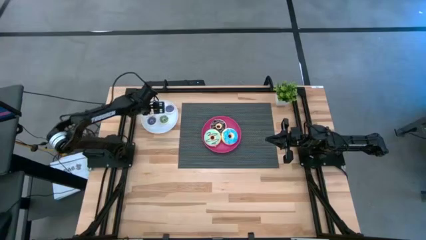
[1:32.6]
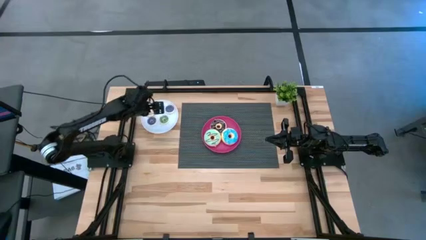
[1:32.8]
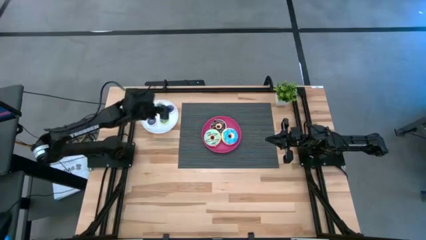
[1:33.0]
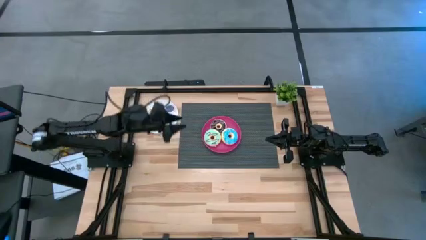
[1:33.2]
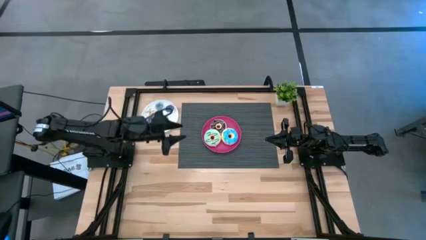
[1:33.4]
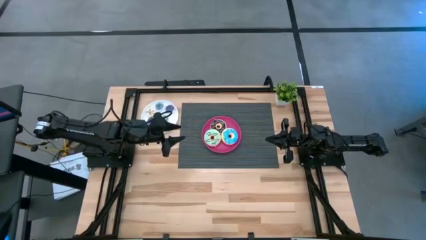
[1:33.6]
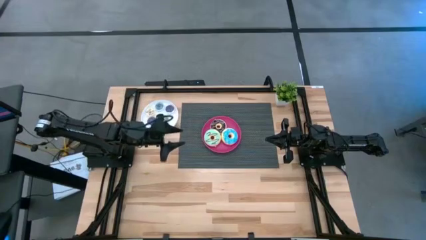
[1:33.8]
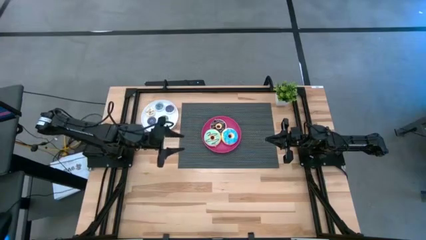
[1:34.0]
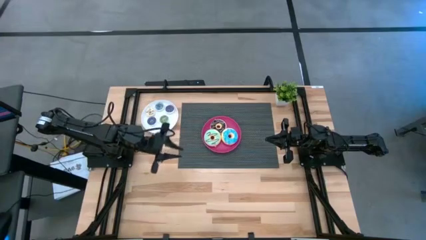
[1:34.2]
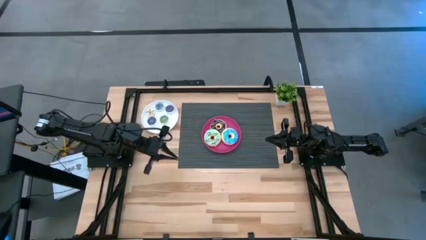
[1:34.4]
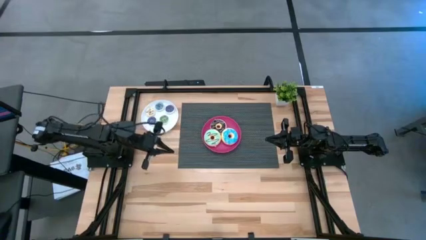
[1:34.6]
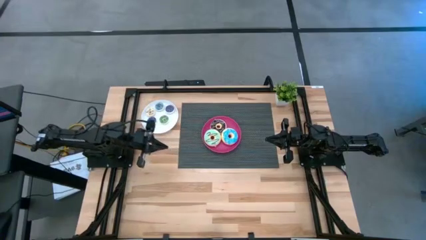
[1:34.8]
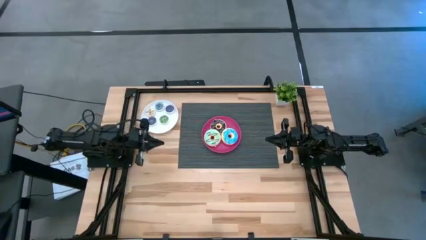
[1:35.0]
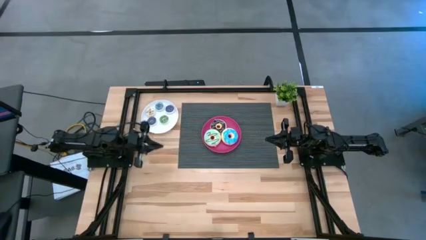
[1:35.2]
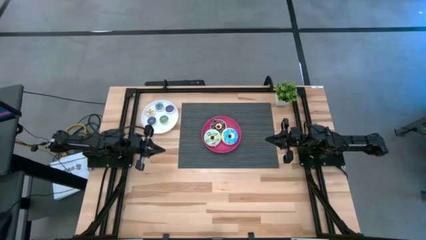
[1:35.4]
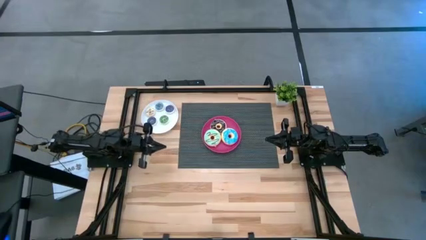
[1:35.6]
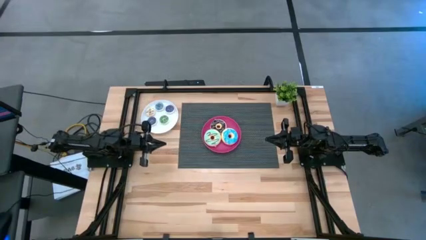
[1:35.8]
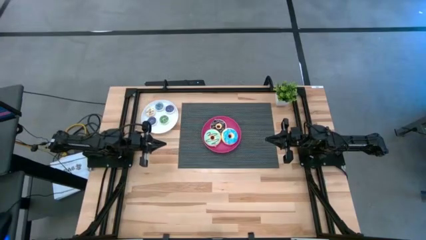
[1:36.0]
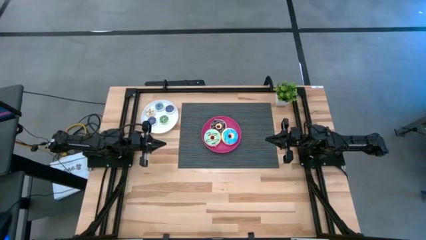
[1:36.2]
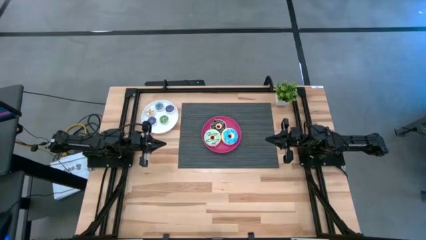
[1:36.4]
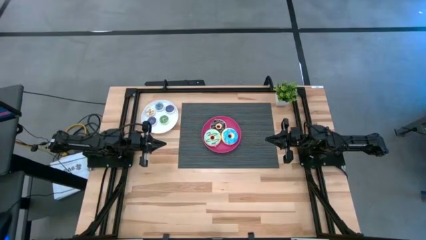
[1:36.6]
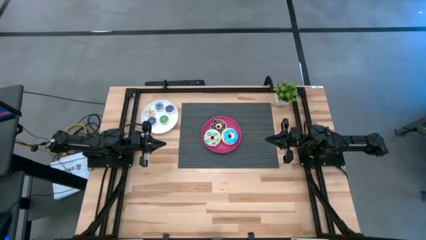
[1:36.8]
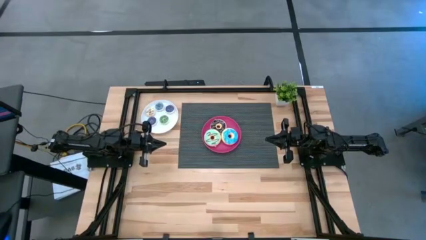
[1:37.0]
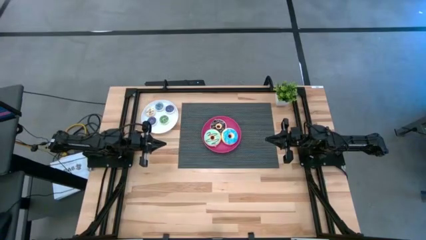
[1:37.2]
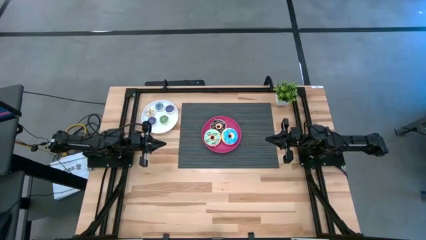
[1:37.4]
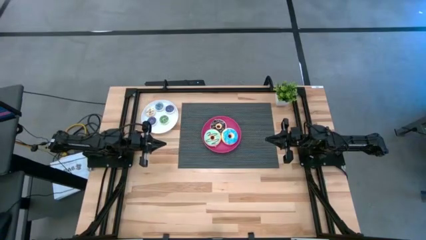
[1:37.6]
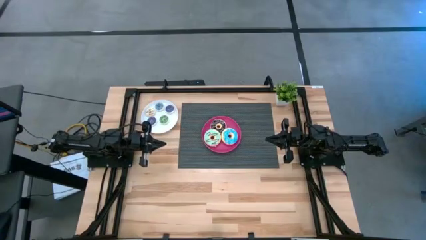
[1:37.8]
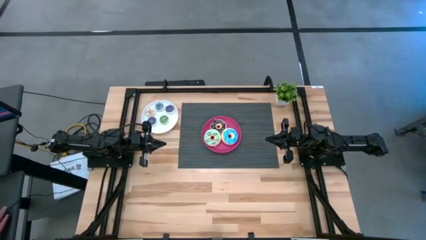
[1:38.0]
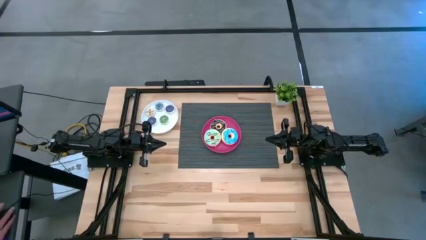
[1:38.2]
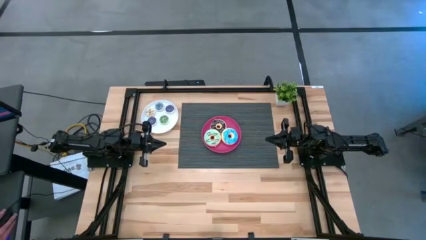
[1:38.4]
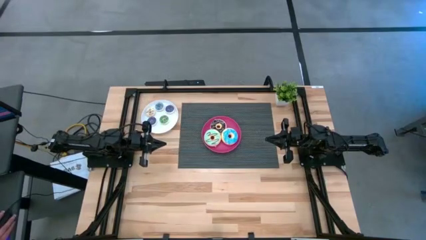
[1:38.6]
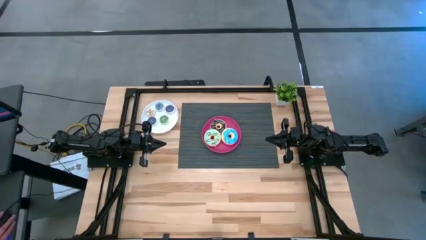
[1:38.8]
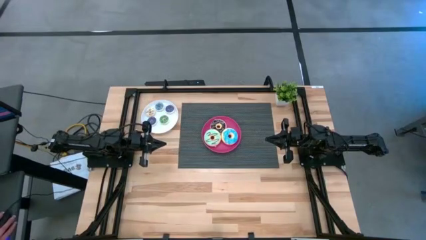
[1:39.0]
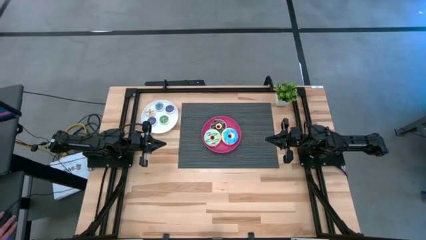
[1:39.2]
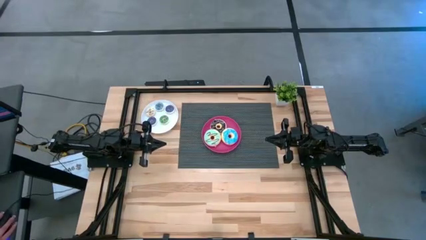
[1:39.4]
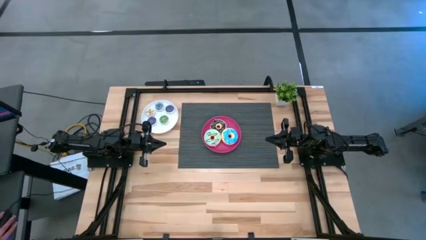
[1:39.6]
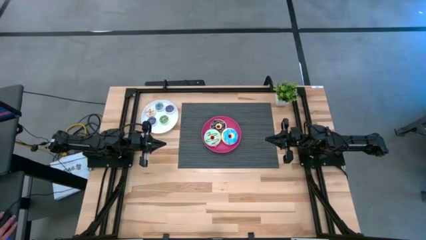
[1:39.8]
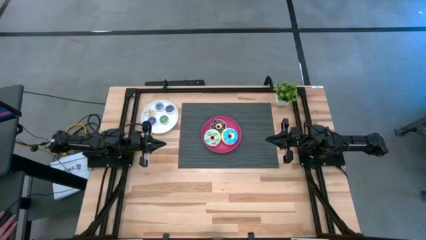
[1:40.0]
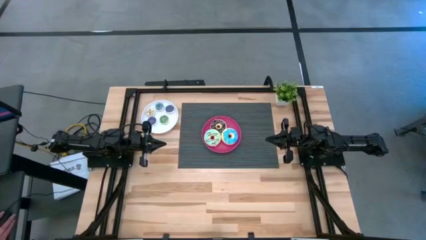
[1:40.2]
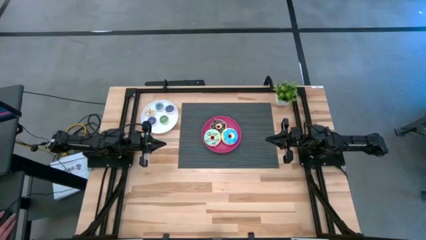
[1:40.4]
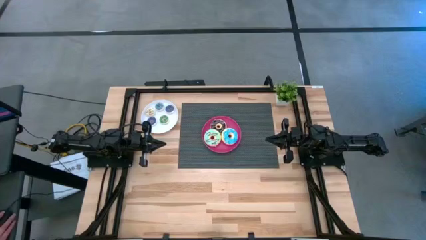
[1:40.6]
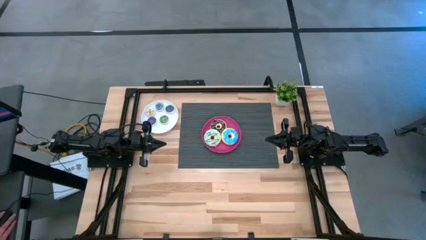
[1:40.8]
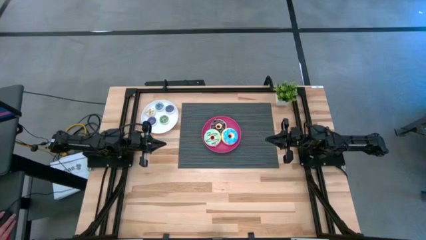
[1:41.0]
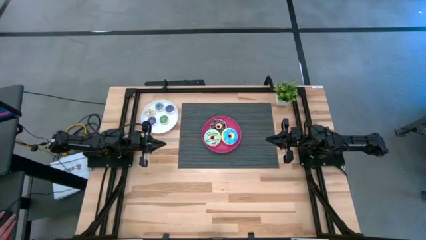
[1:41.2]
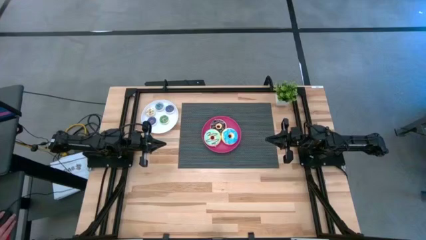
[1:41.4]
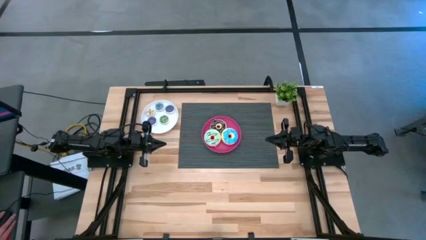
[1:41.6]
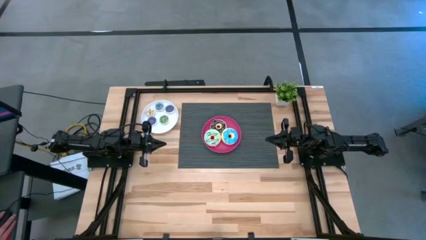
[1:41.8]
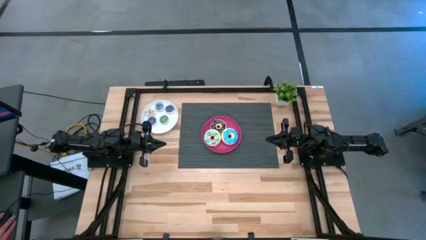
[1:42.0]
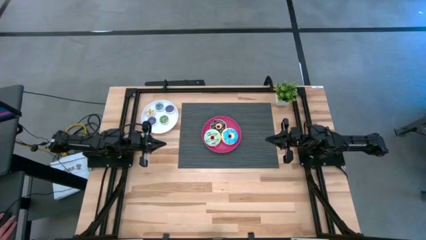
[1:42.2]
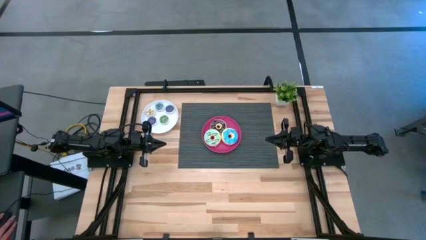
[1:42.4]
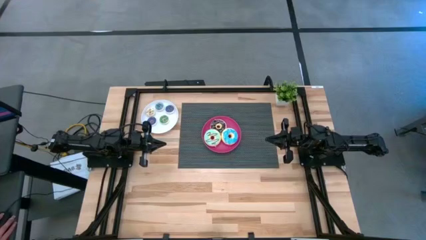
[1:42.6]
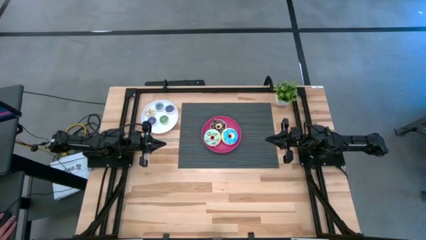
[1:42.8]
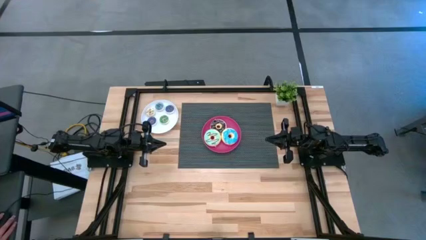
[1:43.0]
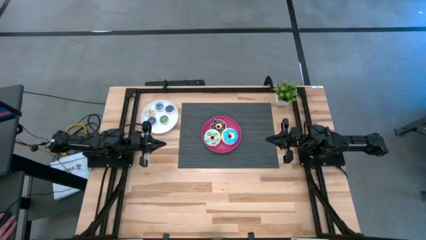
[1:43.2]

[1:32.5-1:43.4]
Task: Pick & Place donuts
Return to Home Position

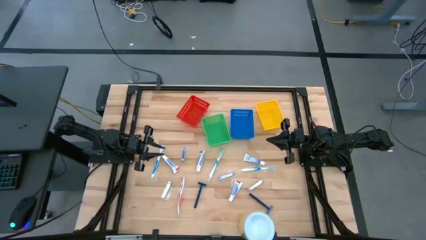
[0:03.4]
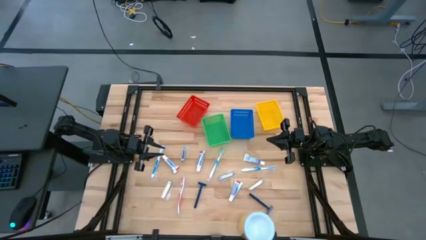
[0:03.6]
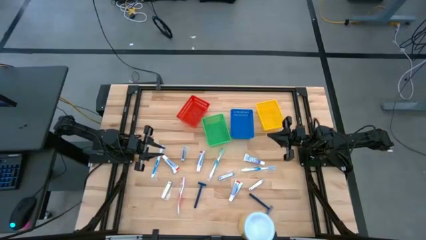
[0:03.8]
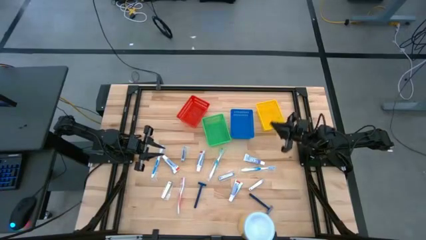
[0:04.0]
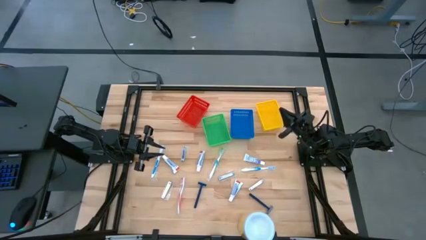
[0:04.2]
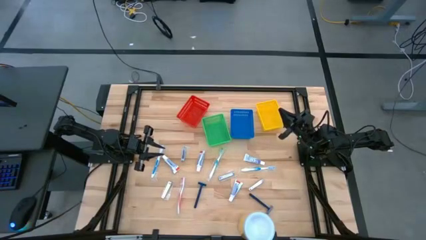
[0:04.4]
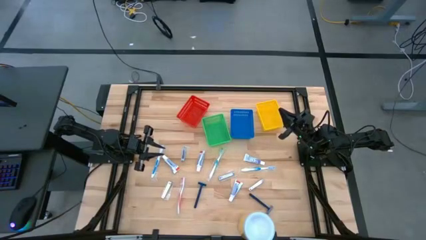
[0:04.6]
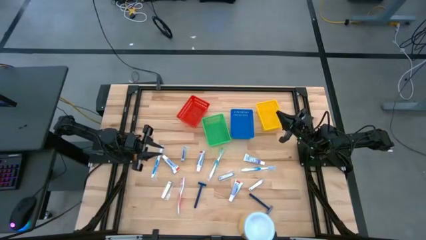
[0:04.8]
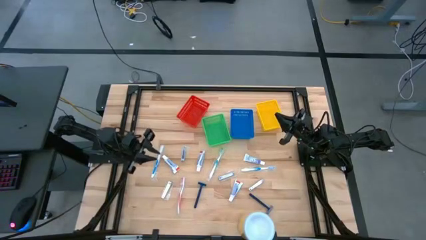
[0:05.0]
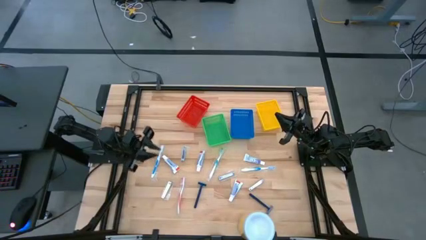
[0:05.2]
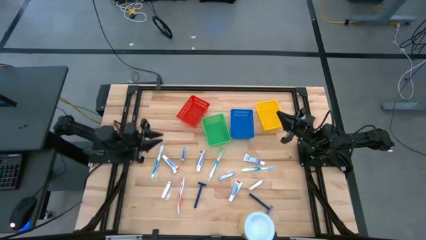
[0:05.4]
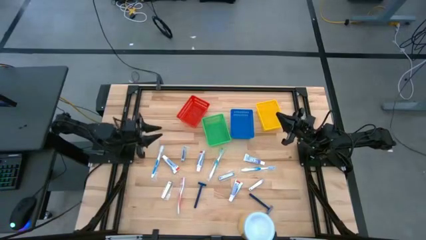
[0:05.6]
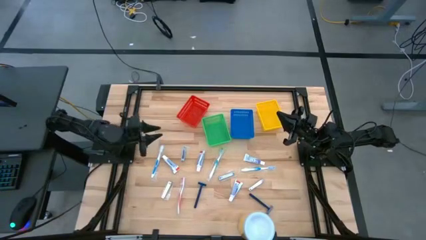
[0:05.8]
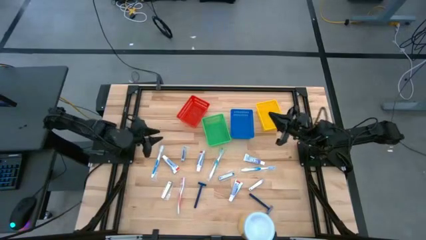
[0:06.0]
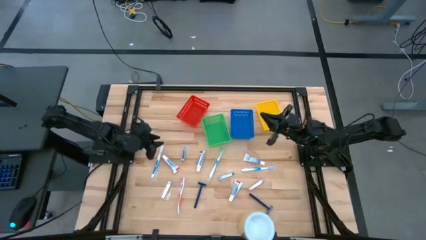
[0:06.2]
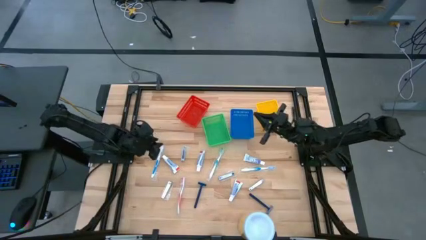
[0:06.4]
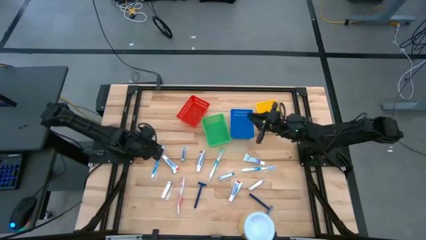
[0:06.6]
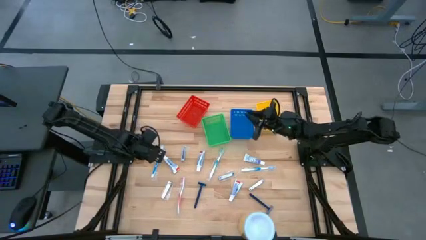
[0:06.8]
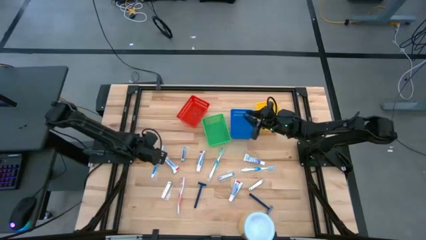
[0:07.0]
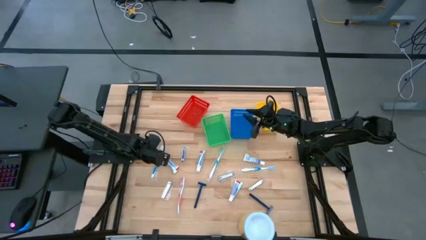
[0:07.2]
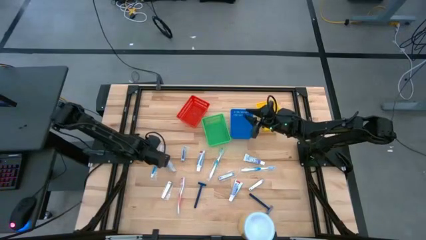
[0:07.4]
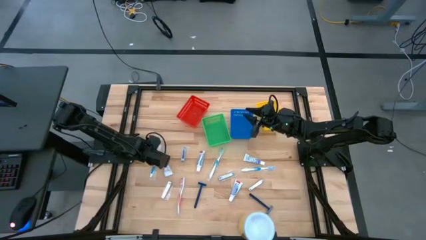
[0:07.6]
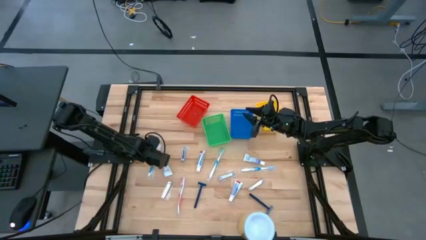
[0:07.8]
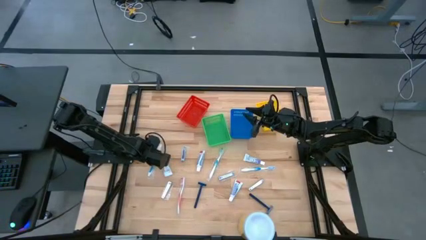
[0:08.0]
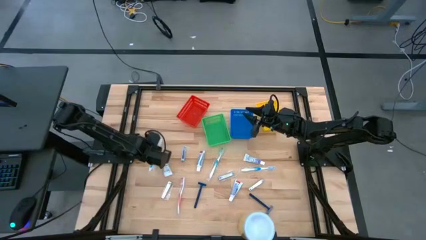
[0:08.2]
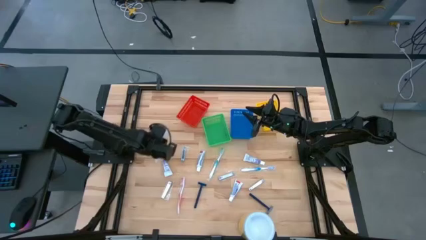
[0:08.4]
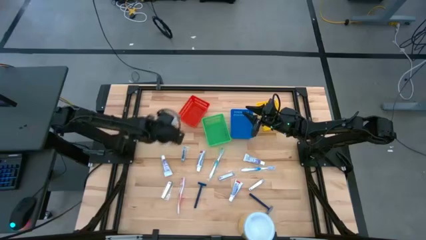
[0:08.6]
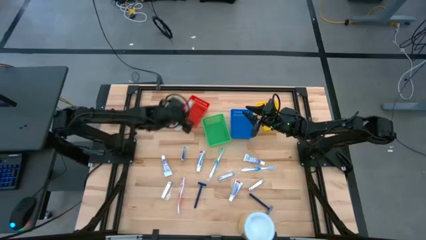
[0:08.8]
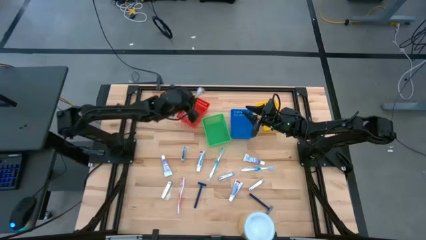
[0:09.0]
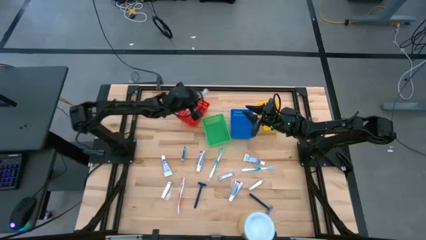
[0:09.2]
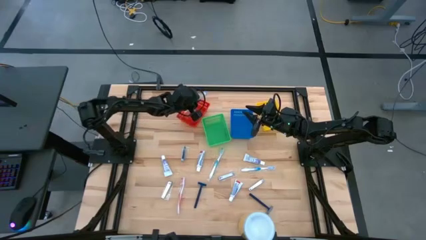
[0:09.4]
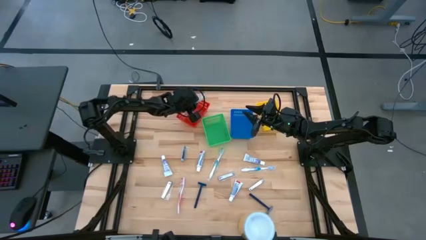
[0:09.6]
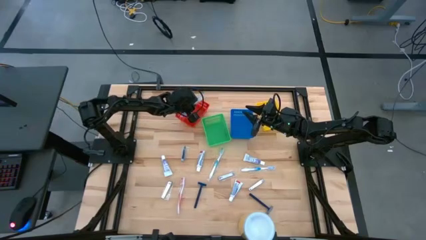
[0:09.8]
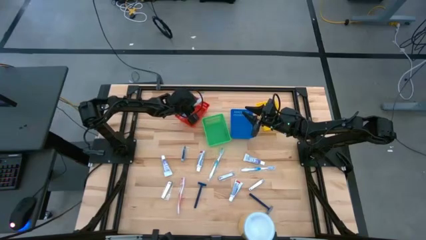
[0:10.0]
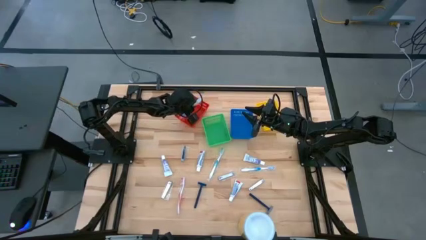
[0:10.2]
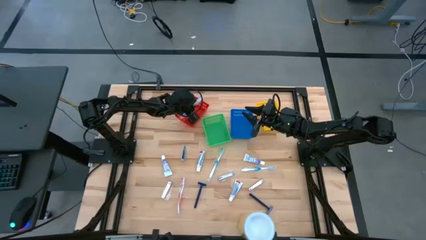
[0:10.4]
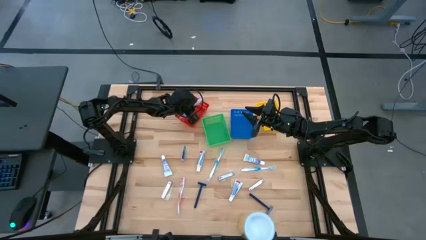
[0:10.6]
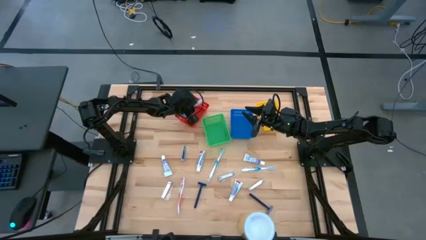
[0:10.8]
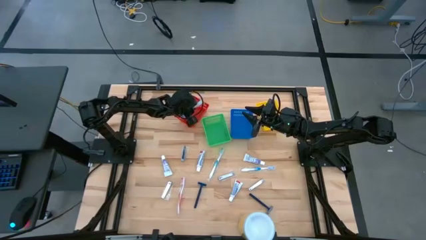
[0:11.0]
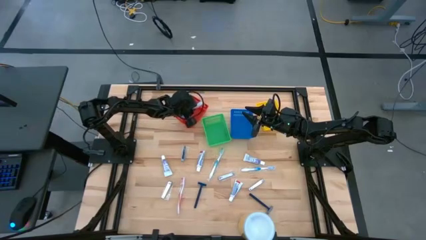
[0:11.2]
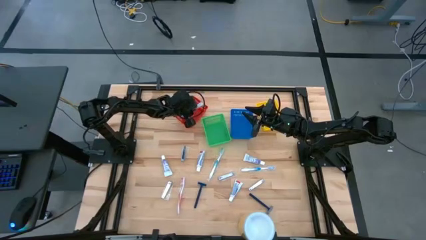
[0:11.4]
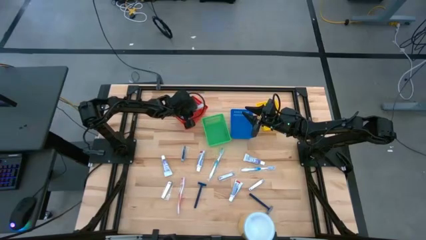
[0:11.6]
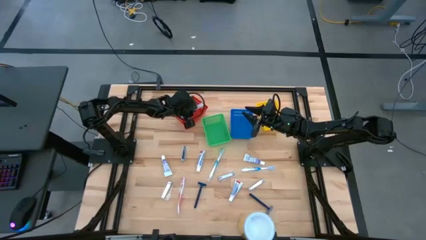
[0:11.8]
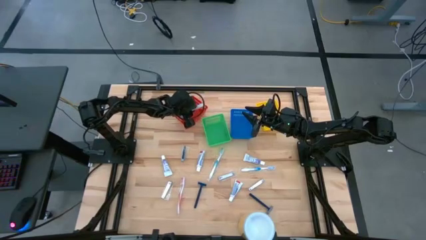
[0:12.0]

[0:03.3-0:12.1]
Task: Pick & Place Travel size toiletries
Put the blue toothbrush into the red bin
